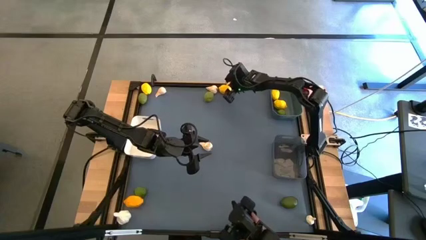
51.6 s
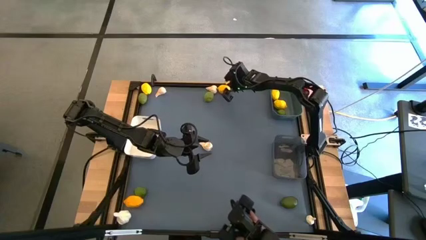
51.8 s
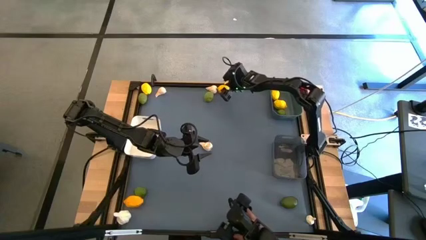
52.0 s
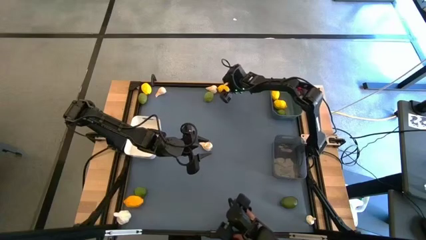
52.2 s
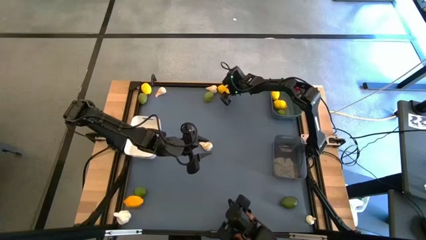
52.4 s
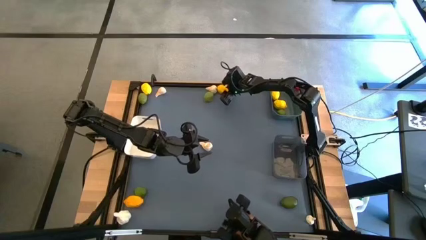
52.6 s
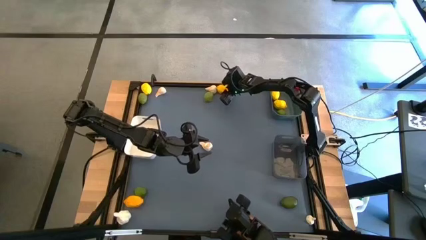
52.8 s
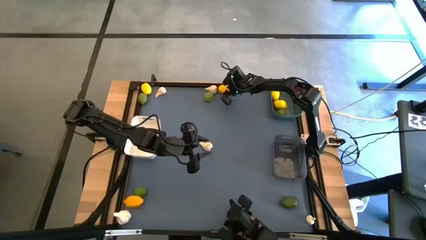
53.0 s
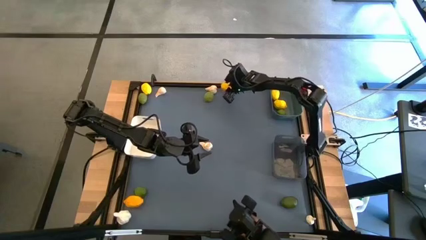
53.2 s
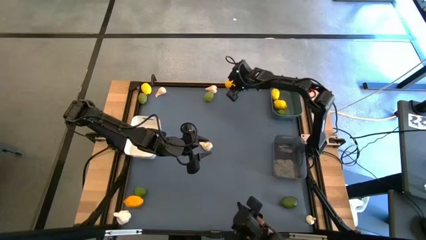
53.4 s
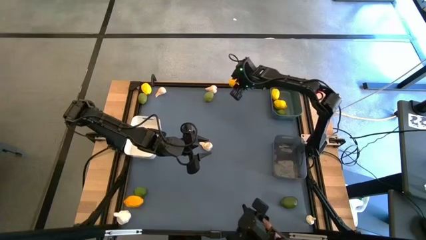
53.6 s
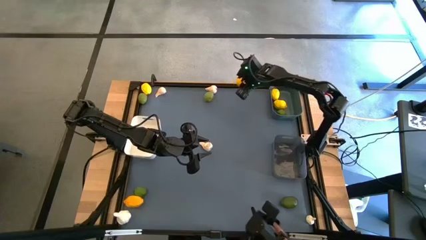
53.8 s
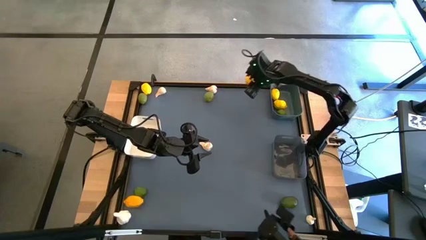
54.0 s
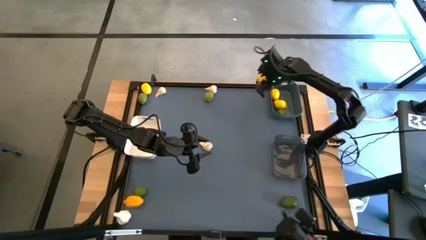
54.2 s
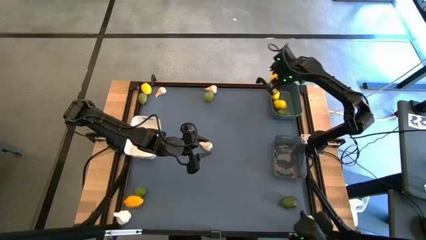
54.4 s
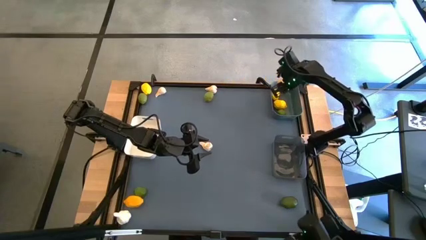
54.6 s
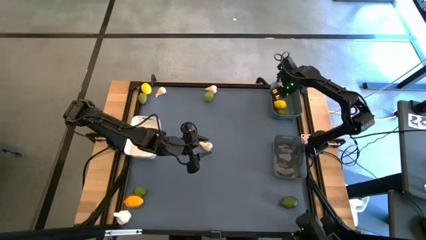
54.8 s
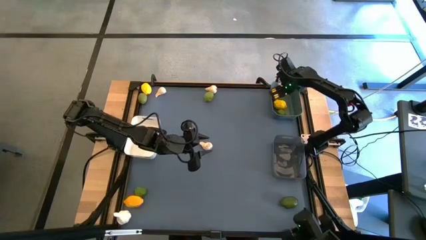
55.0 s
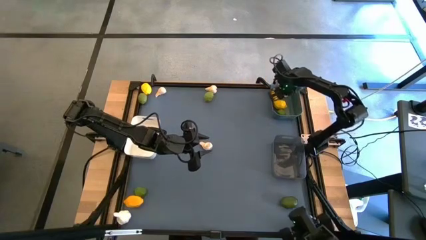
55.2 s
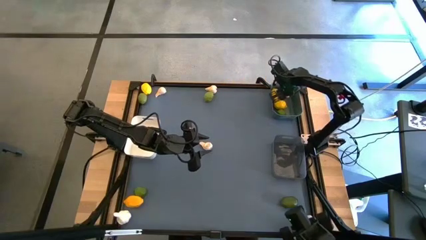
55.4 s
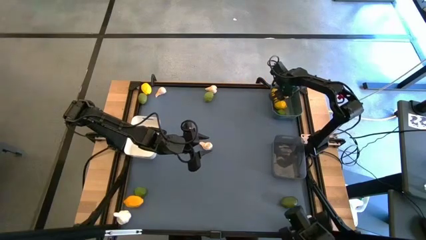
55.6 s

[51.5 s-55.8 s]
Task: Sort produce into baskets
Put the lemon into the blue bin

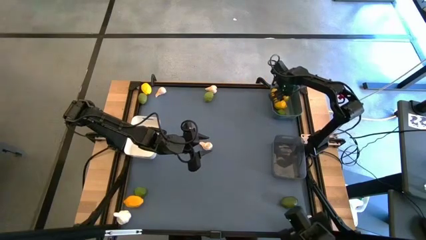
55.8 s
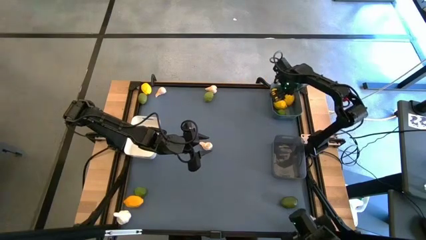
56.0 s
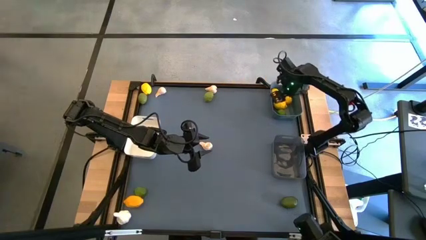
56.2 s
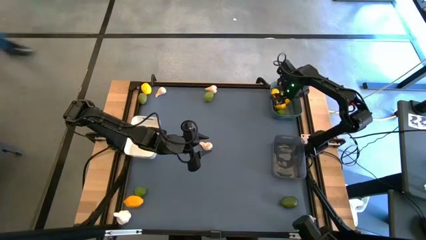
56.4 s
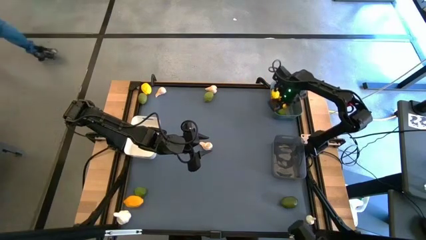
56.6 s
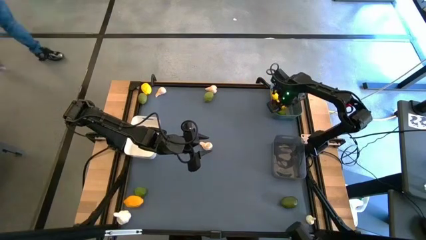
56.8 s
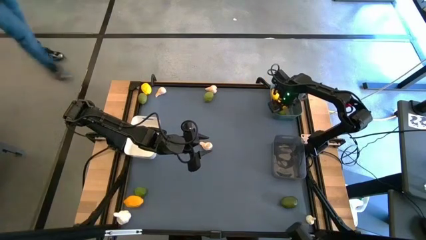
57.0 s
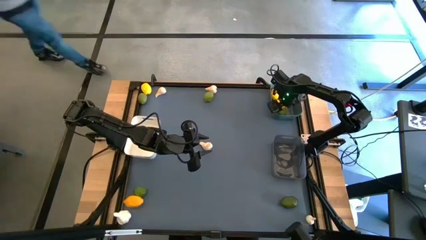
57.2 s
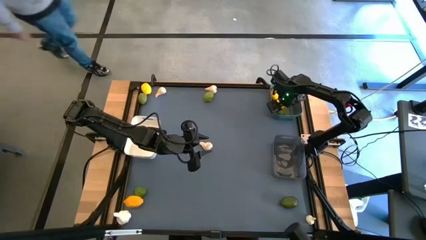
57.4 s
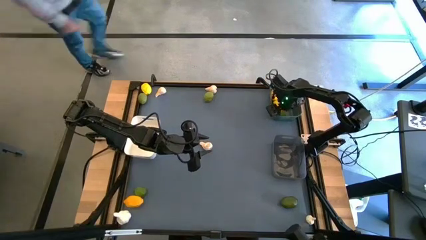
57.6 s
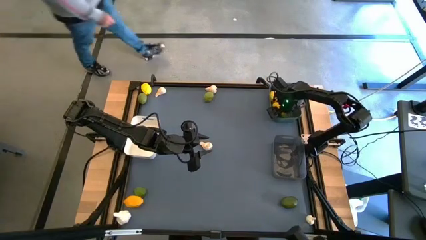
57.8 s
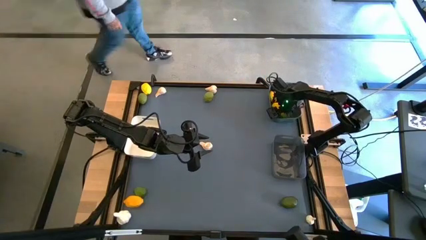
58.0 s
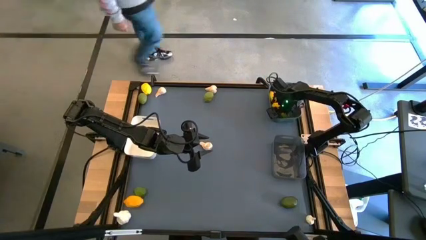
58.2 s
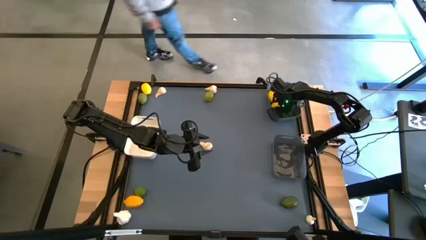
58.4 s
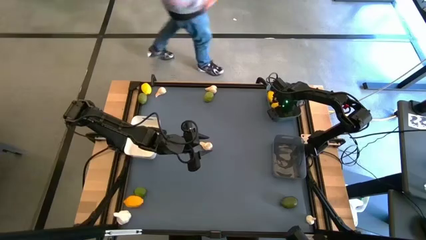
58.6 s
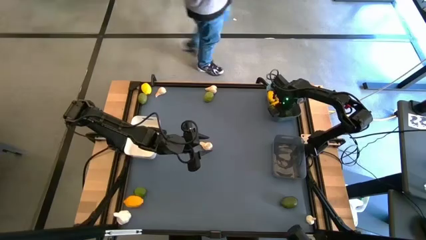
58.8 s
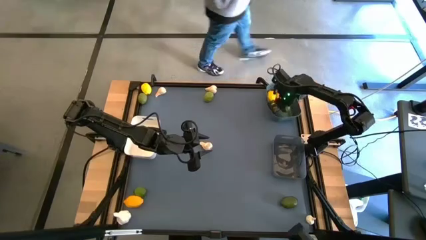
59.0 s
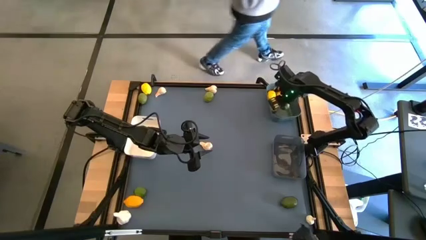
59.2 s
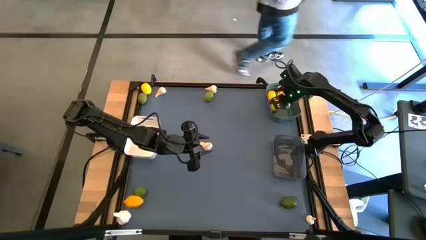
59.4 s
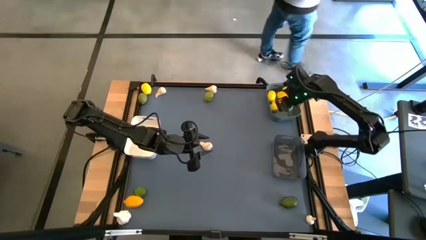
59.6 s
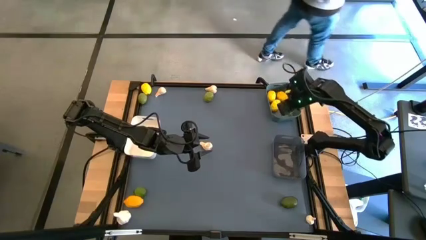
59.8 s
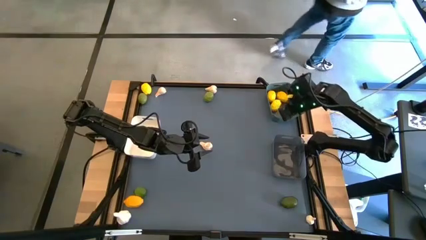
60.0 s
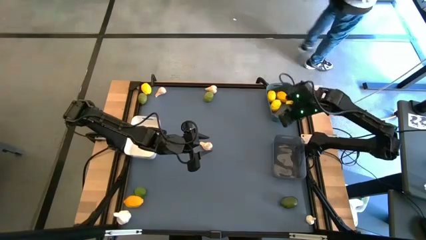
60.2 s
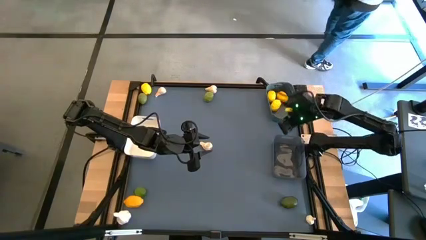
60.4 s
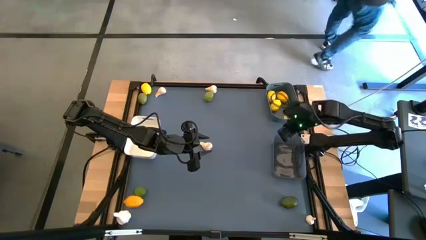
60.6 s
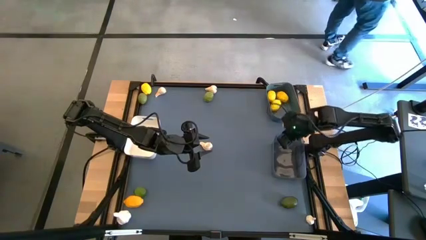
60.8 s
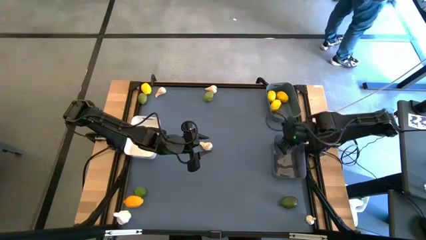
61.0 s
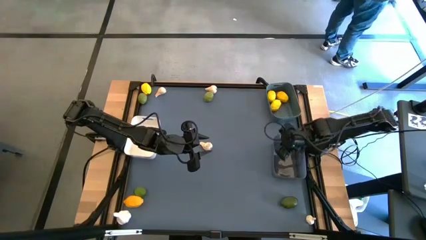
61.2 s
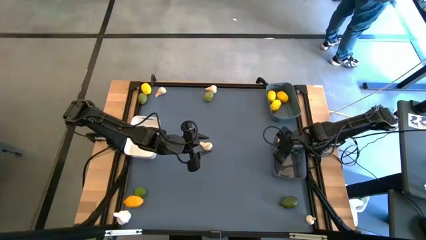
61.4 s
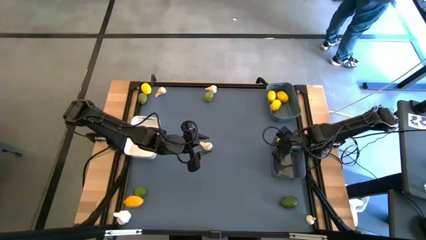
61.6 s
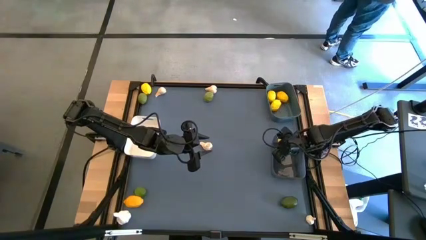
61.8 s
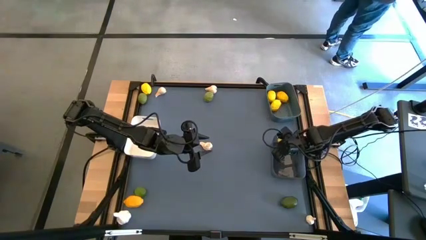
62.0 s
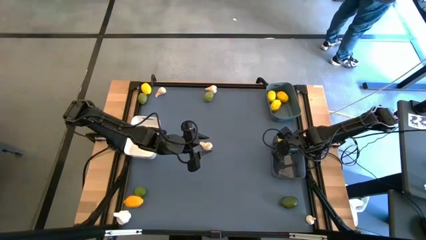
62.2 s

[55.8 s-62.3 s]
Put the lime into the black bin

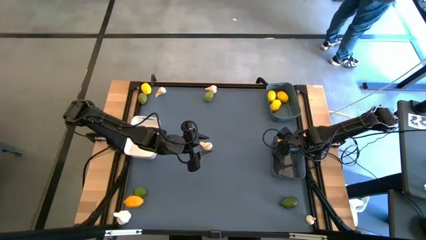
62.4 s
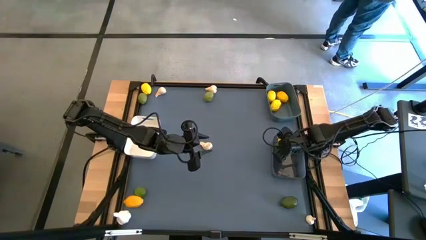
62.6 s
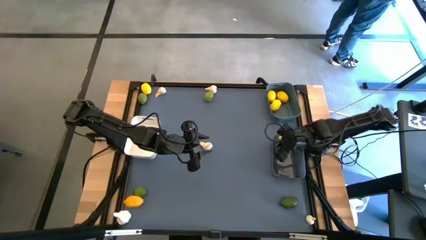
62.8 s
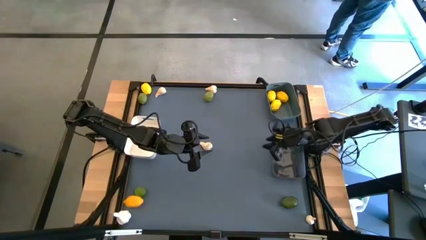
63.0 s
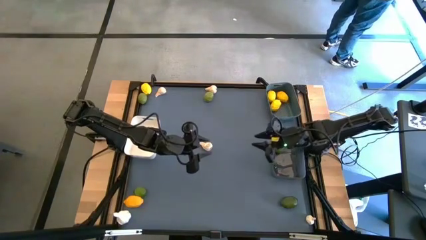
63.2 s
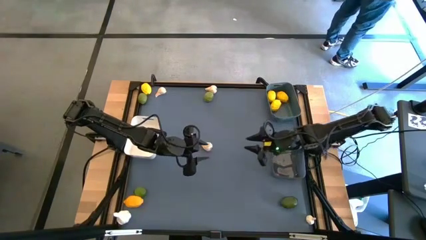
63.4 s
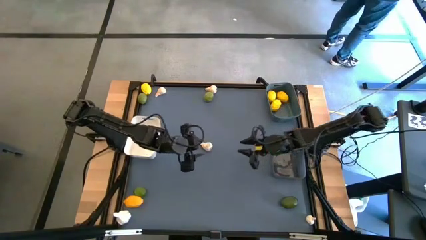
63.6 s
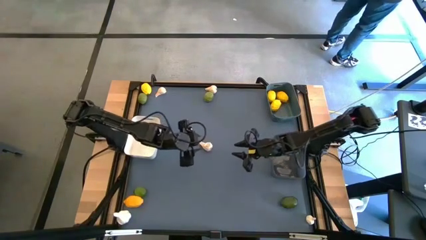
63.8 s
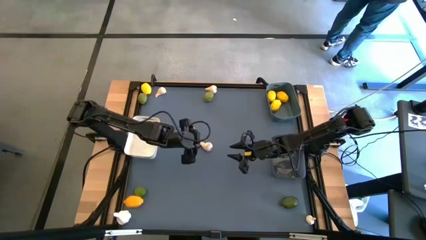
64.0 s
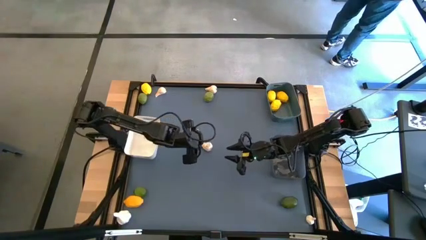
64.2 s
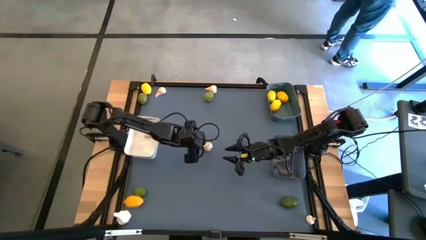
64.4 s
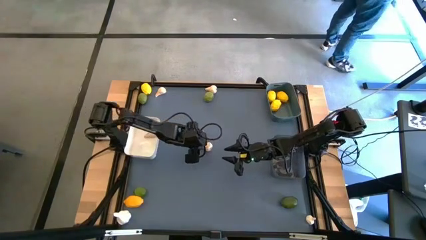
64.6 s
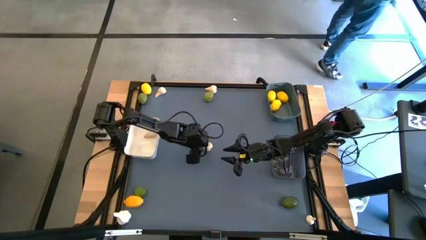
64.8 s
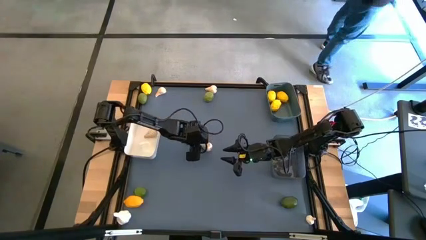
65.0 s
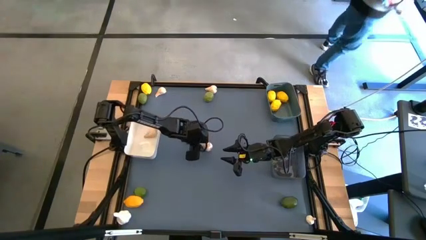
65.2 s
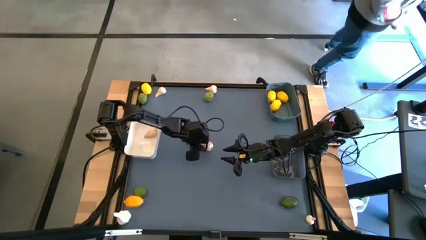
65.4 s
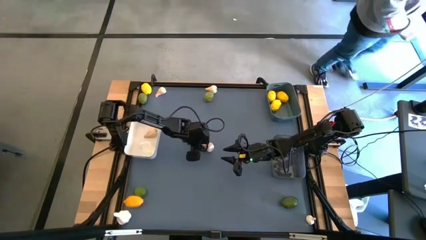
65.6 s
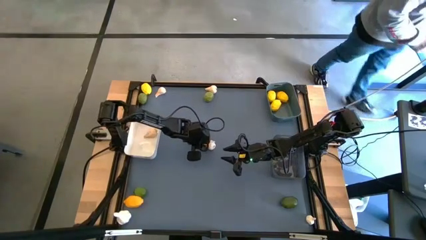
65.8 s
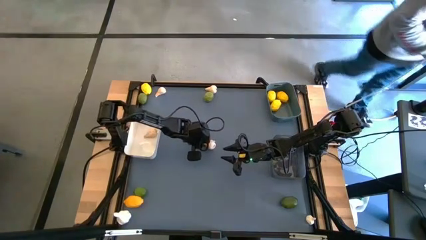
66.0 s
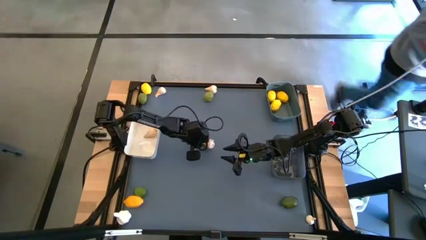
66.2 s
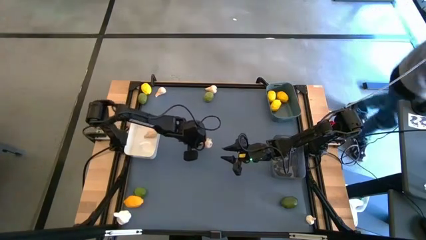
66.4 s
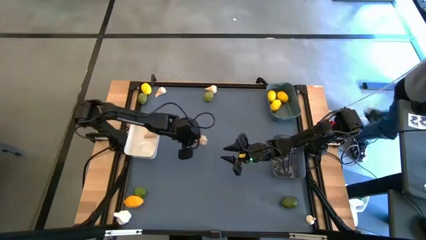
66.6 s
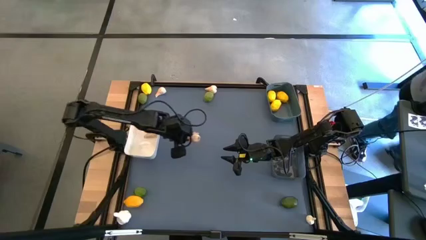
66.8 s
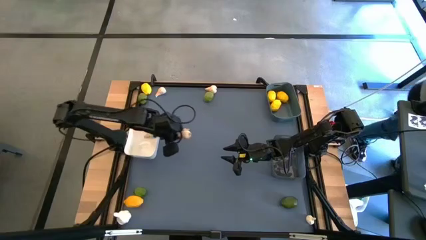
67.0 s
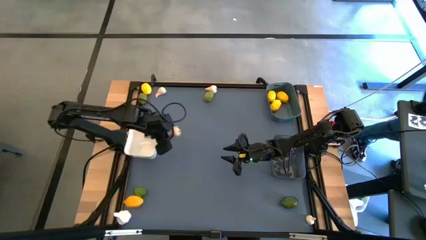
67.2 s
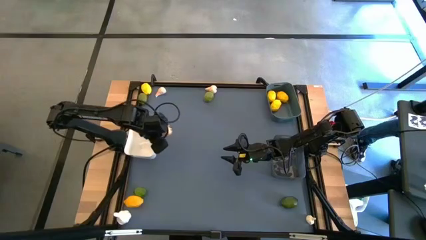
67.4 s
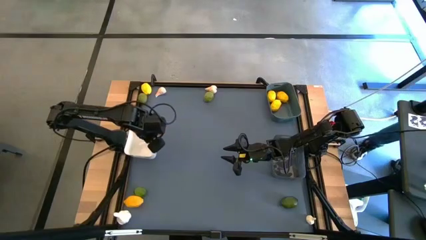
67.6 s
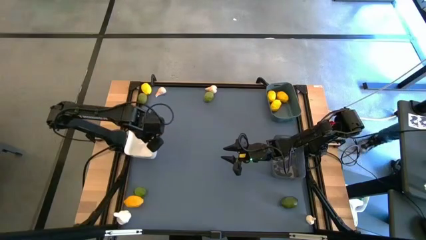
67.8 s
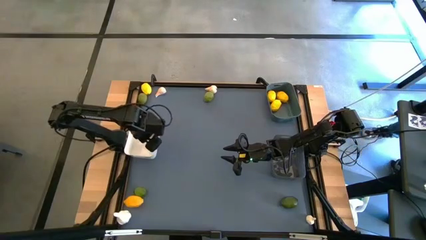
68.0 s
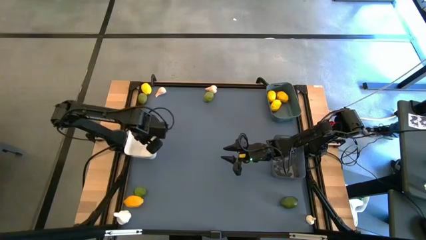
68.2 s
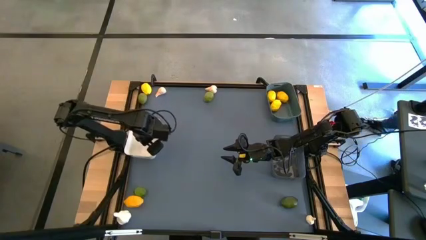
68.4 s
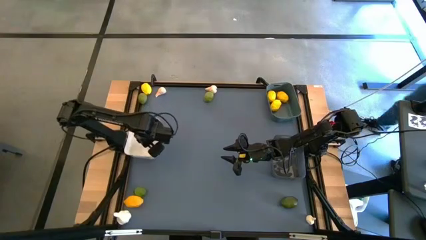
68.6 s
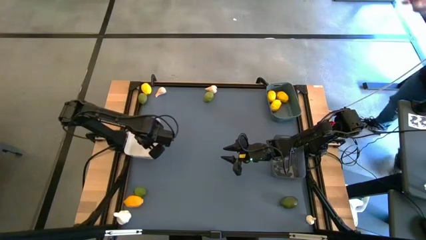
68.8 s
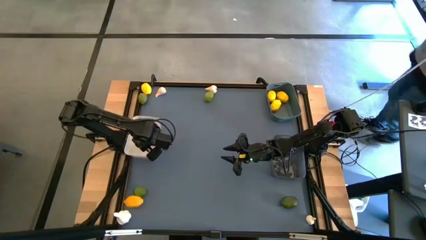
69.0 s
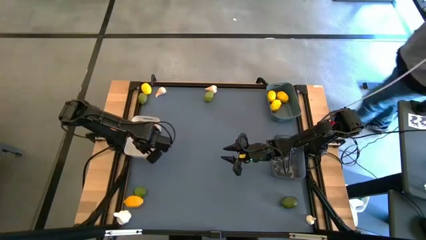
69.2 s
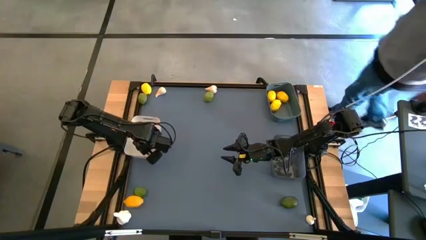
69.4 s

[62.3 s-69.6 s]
Put the garlic into the white bin
